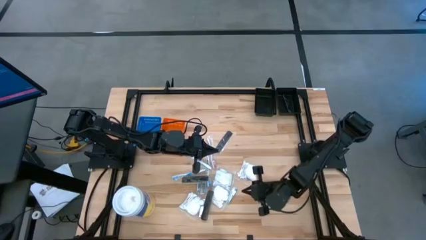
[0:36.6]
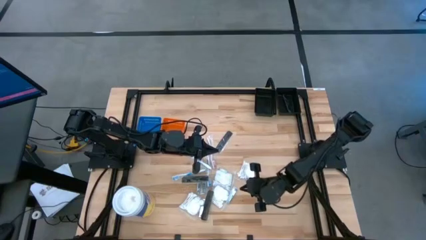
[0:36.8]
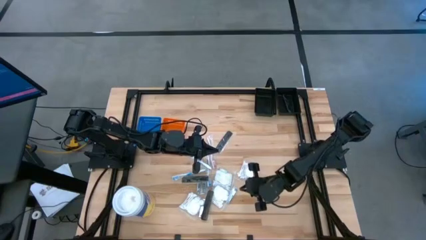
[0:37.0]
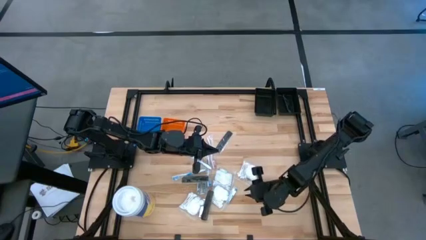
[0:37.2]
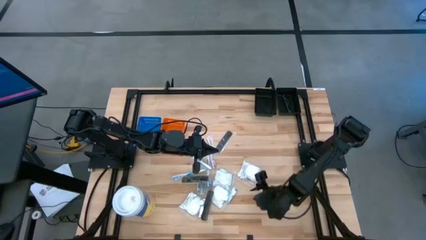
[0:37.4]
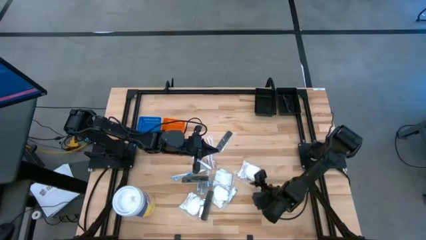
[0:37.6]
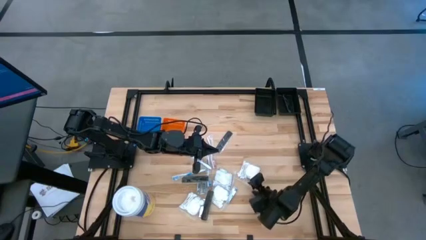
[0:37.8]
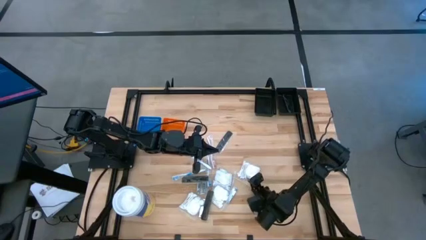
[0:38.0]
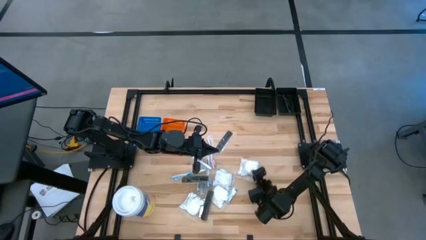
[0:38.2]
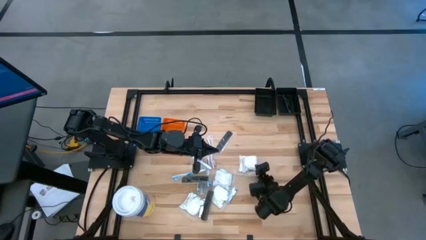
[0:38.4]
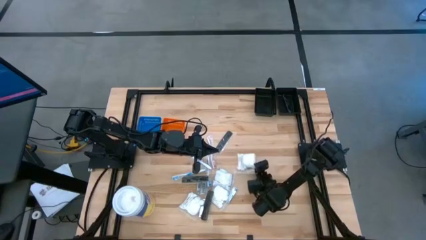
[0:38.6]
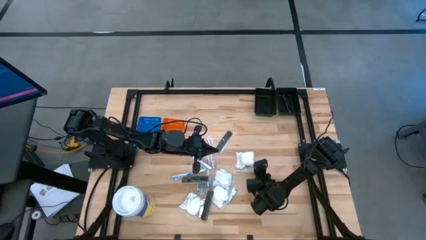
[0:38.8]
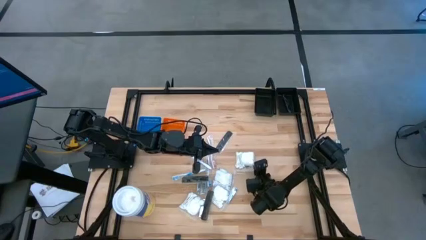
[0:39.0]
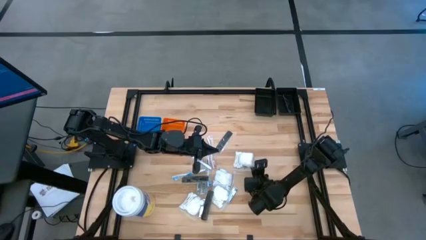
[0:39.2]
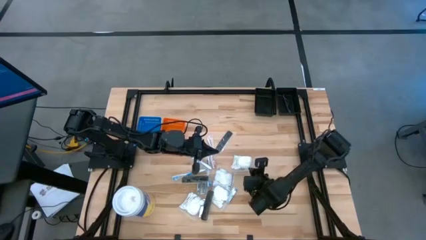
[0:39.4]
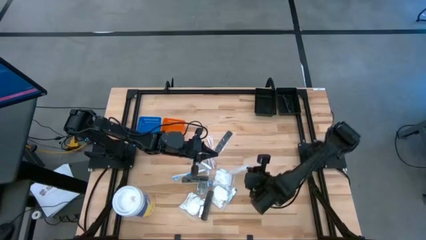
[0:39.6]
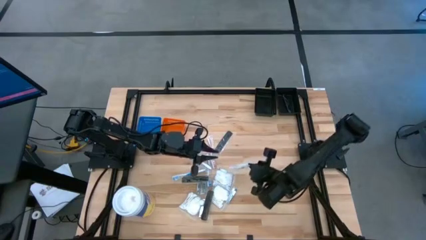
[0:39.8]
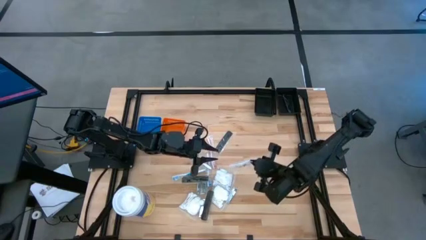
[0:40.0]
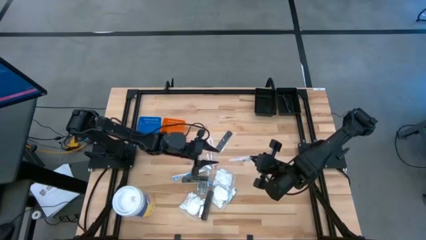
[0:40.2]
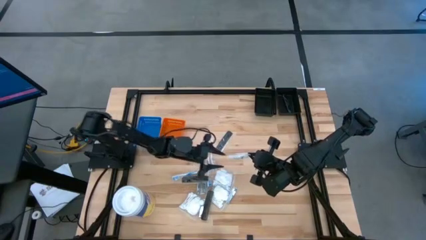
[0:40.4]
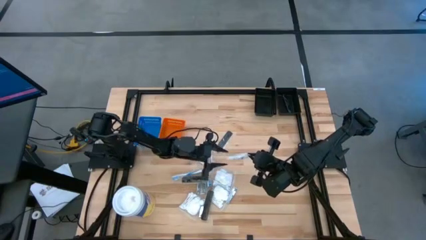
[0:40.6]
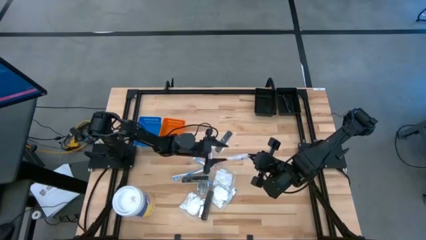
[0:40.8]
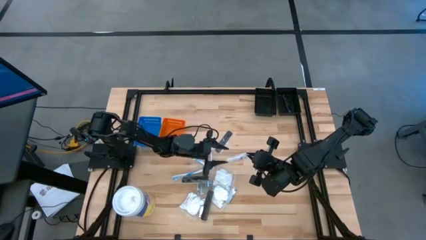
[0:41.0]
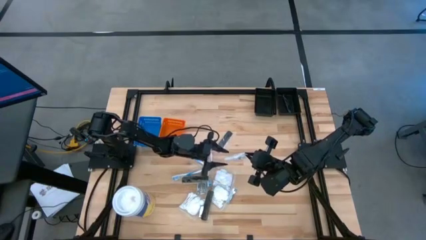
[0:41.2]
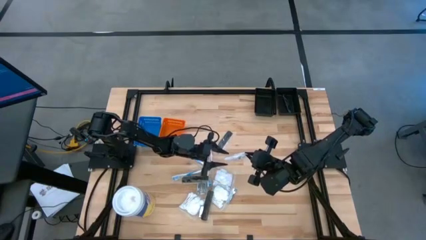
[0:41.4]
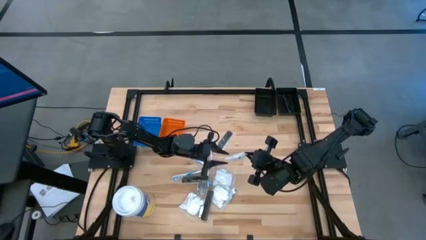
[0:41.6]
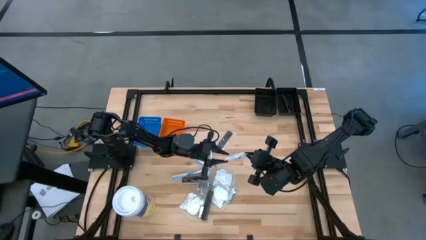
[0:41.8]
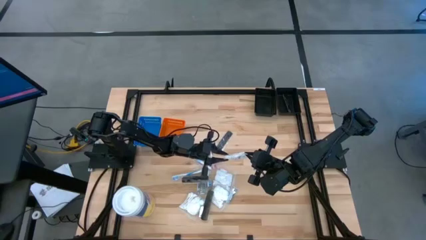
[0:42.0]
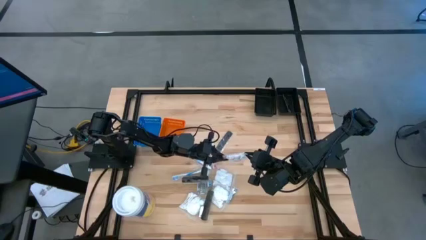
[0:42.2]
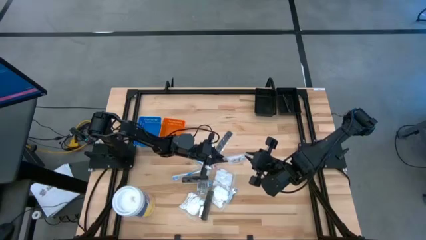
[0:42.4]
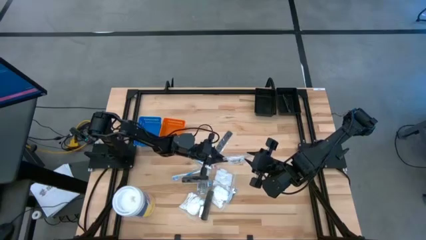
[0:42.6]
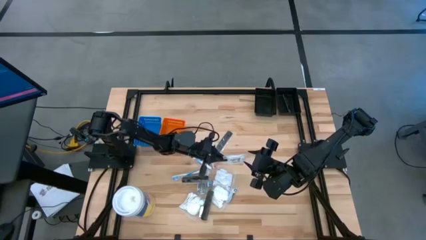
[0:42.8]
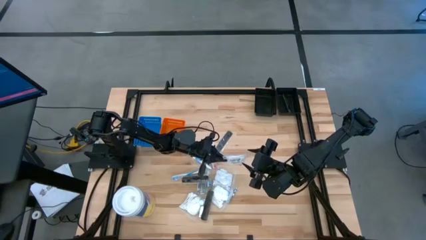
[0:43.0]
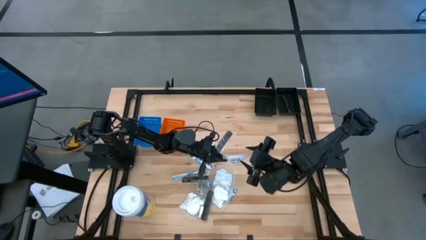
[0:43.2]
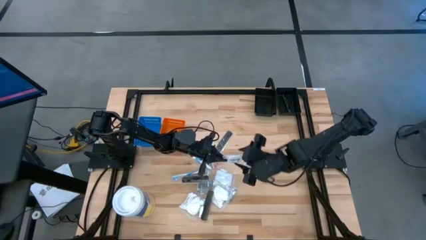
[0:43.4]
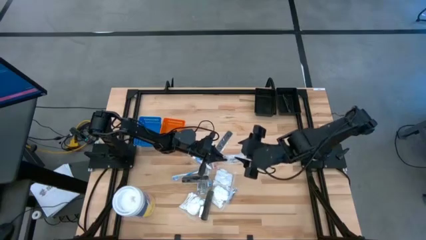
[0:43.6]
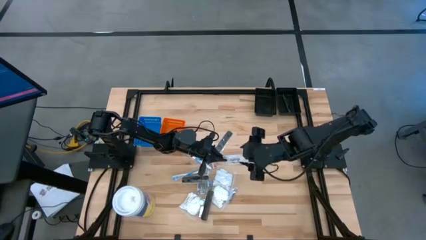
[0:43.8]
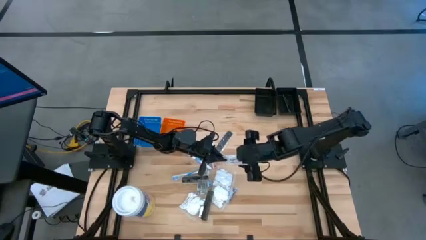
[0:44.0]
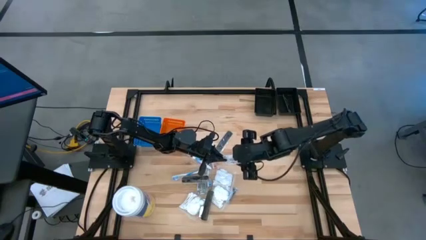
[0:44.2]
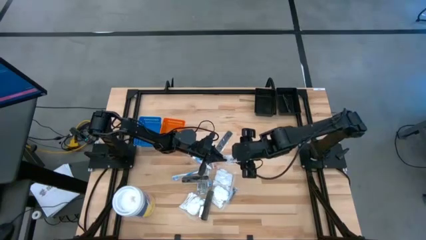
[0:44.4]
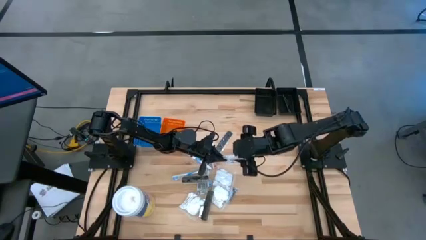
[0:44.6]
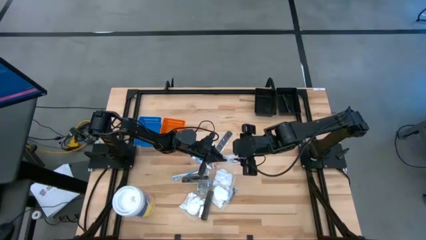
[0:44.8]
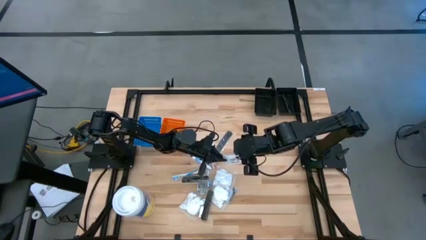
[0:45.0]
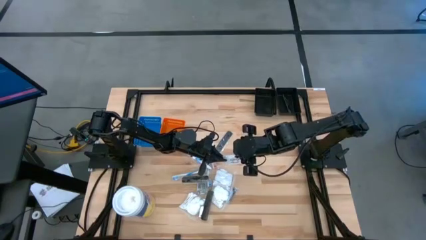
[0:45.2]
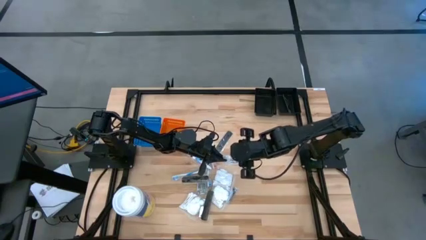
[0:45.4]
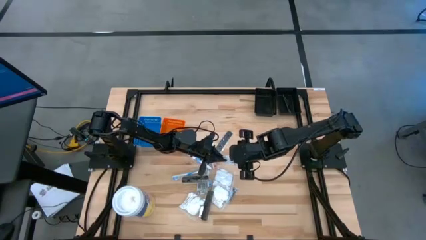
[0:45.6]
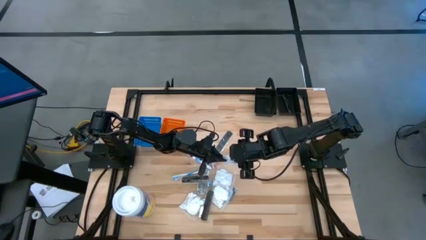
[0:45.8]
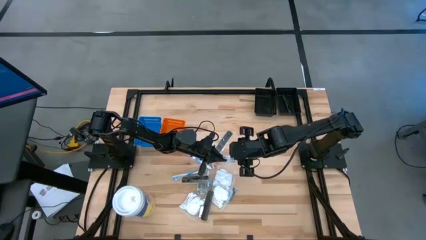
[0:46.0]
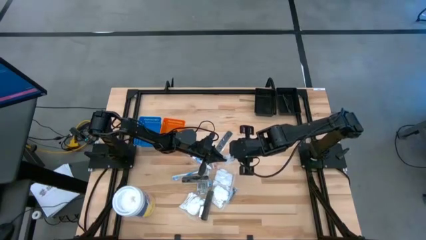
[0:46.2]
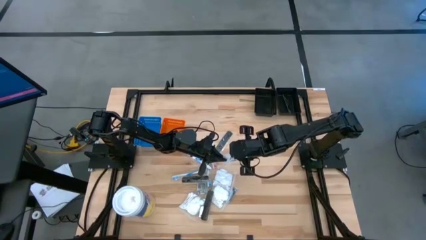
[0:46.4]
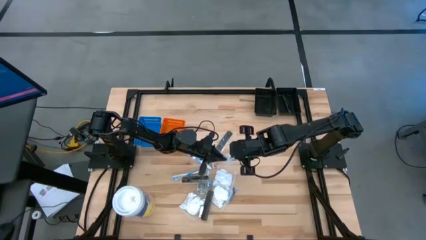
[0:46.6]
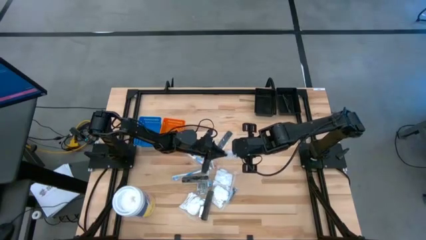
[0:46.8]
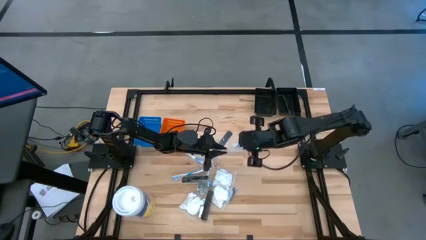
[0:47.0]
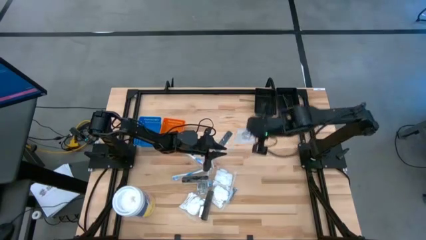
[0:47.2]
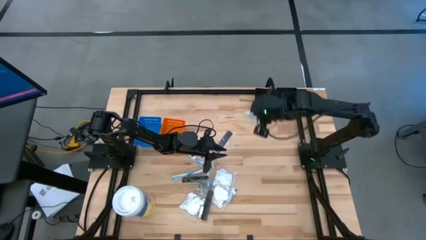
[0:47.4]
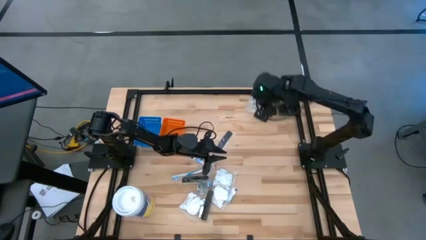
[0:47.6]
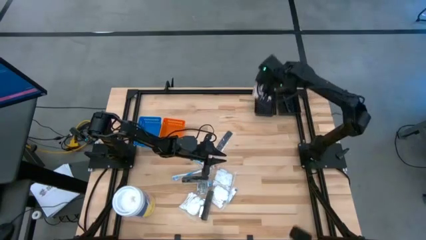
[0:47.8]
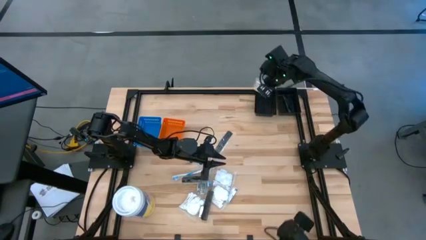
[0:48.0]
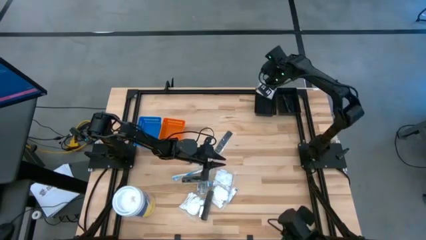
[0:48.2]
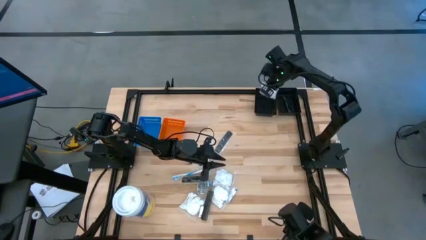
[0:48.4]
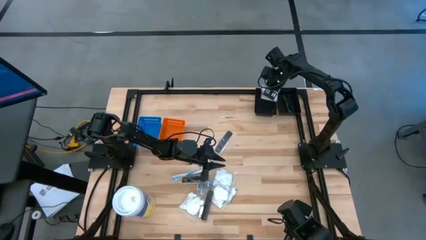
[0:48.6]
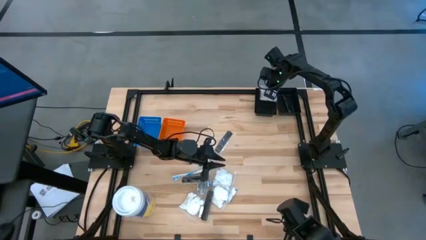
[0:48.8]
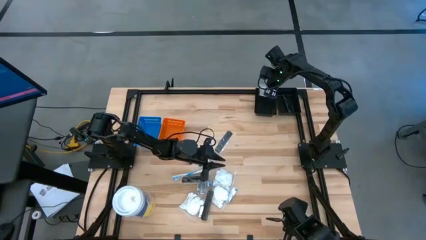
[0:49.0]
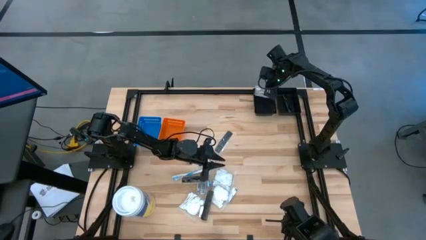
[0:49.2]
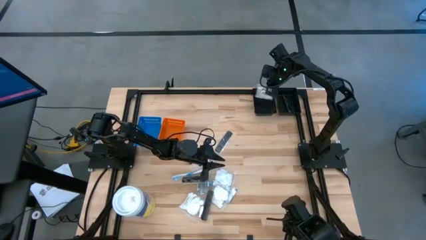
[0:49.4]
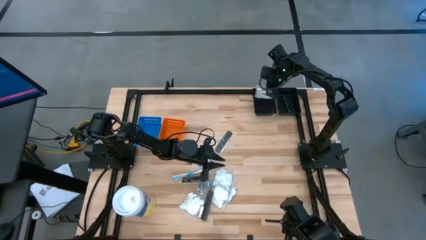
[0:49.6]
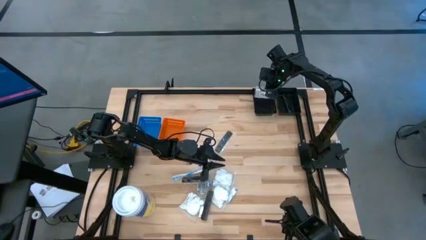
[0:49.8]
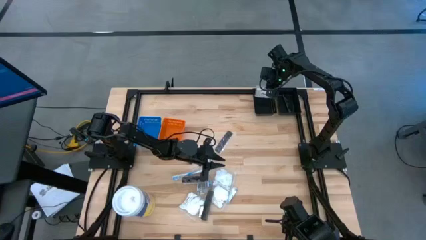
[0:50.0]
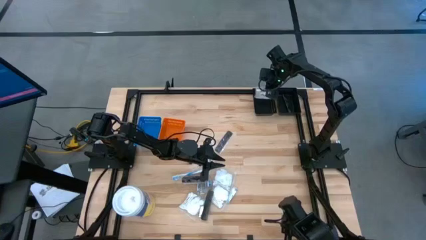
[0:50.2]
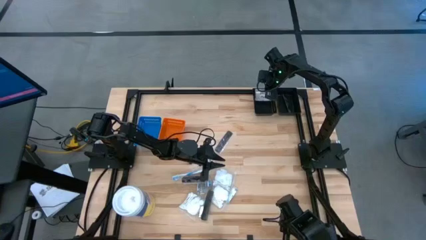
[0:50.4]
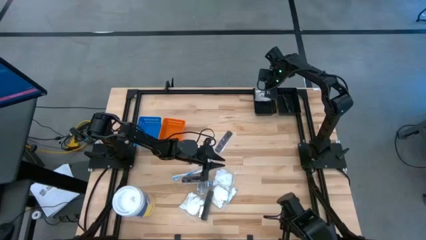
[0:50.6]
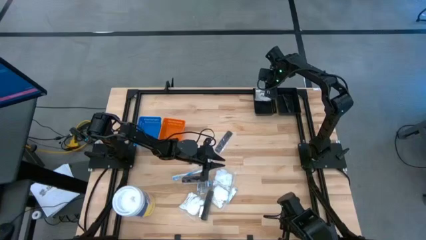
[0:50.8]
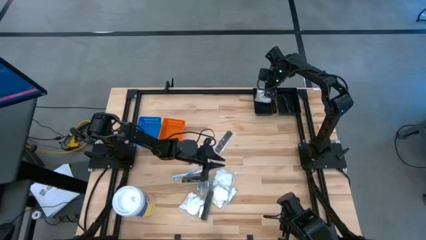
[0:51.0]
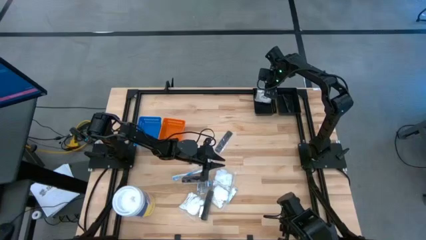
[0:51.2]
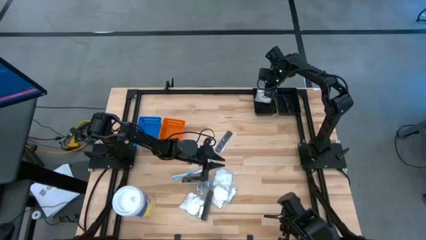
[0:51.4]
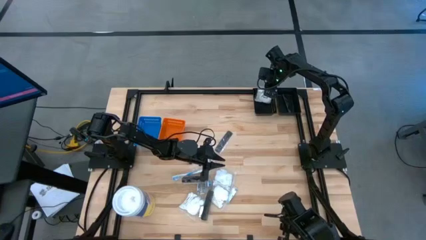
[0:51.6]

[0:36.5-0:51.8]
Task: Pick & Place Travel size toiletries
Put the cotton pack into the left black bin

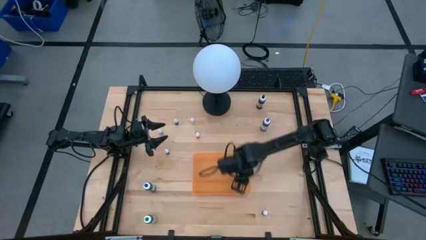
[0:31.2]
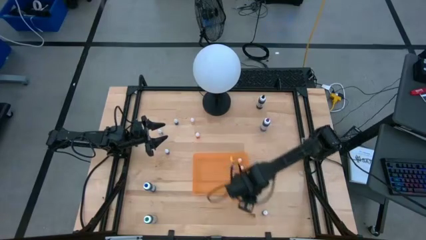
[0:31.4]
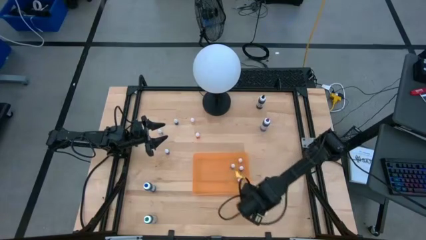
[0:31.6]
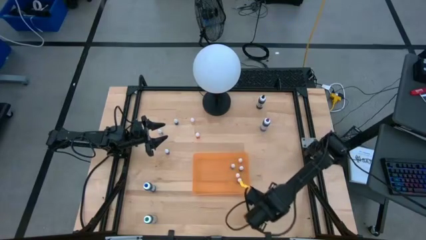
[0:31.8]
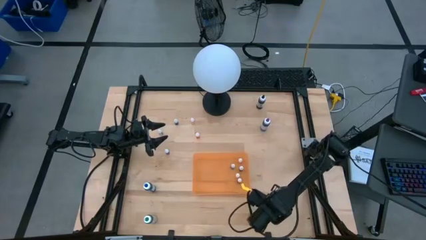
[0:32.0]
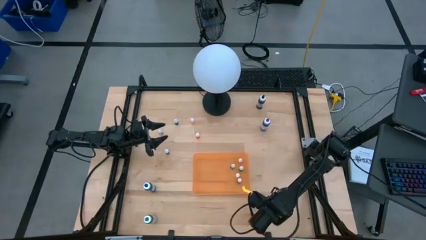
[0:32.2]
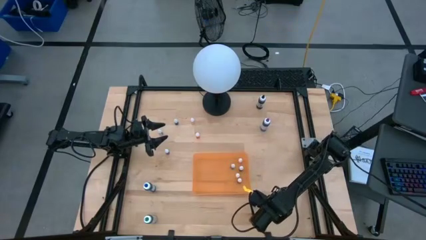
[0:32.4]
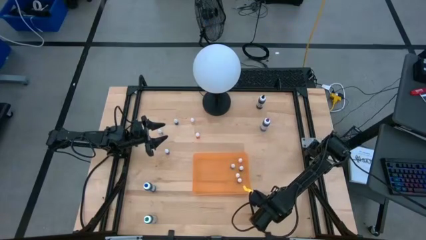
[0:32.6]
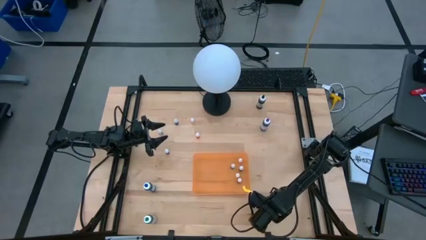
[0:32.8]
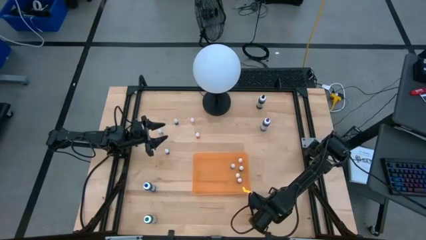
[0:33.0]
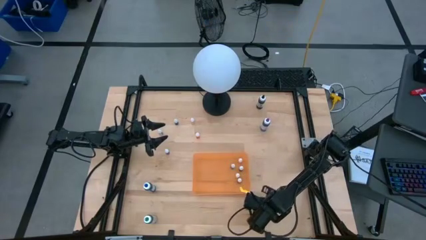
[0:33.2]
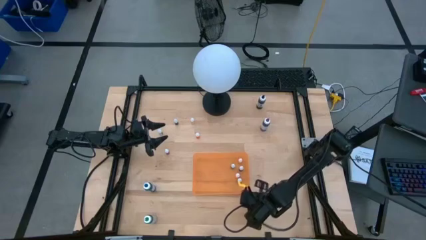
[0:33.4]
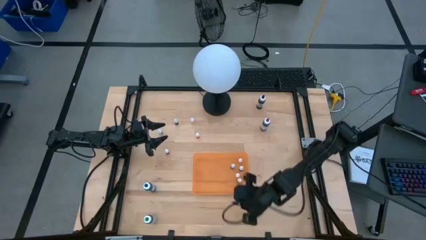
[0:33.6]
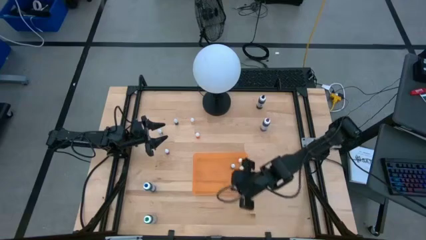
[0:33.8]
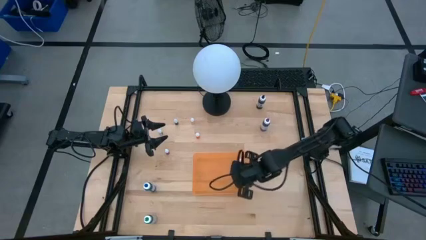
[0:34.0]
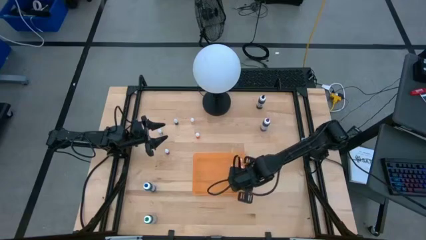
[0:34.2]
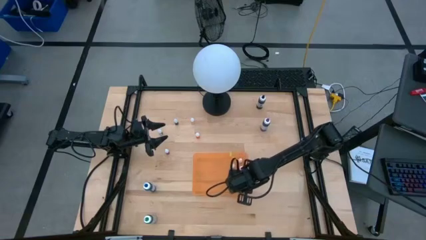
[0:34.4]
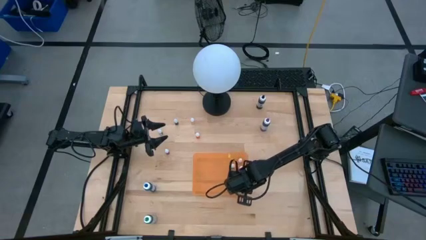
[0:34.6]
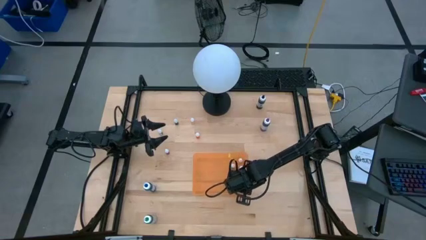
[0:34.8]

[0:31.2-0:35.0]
Task: Pick & Place food coloring
Put the small purple food coloring bottle into the orange container
